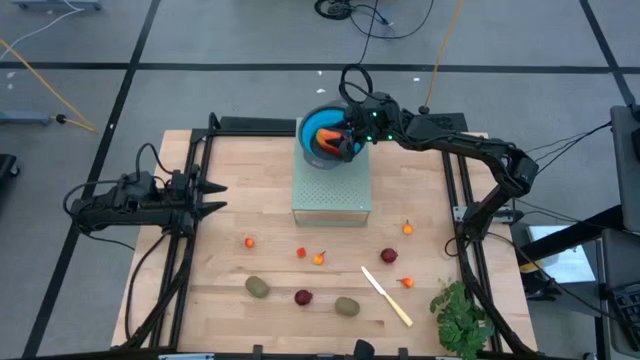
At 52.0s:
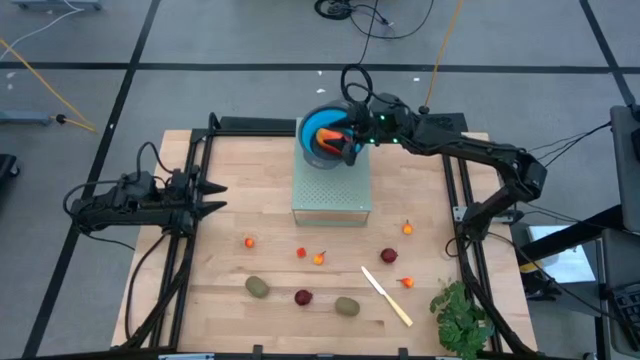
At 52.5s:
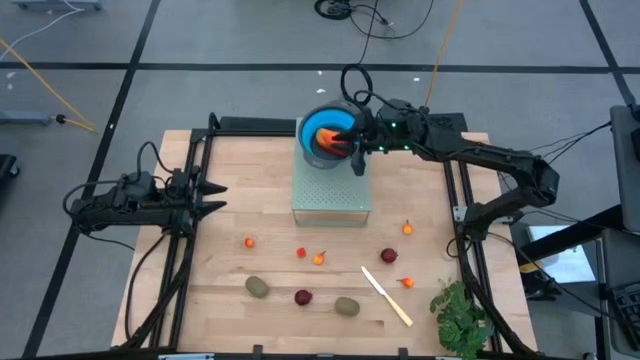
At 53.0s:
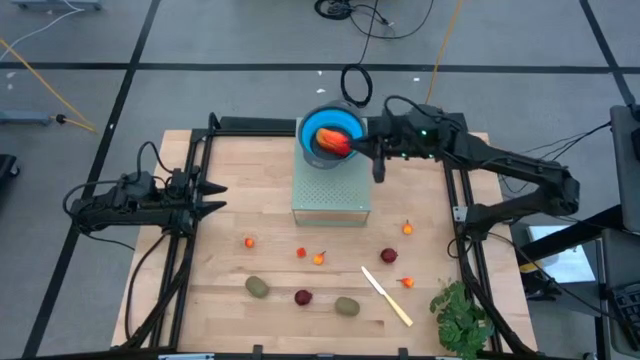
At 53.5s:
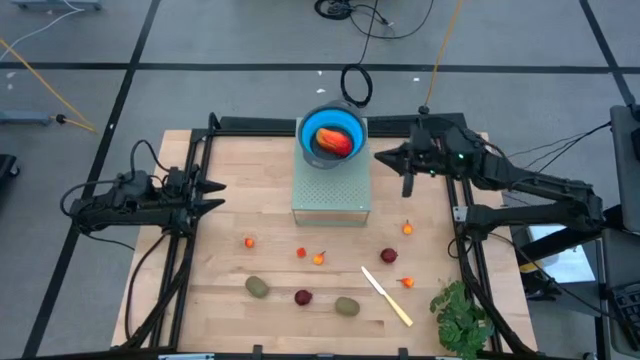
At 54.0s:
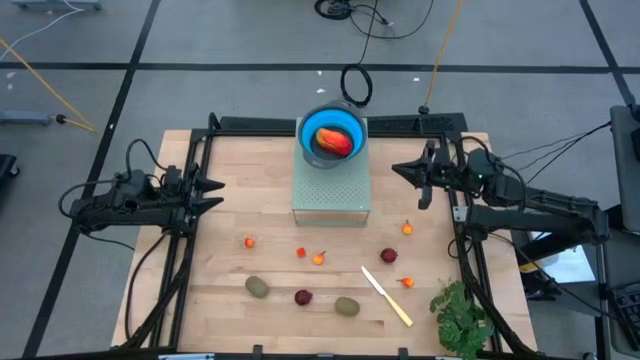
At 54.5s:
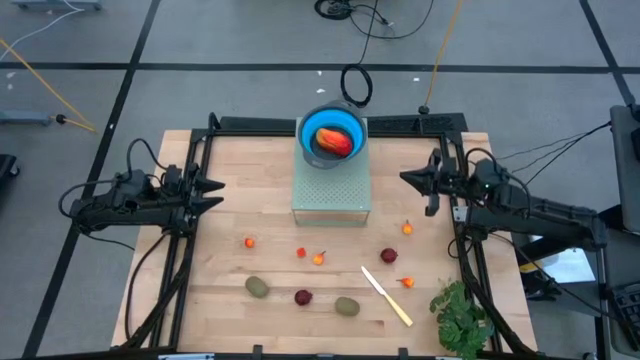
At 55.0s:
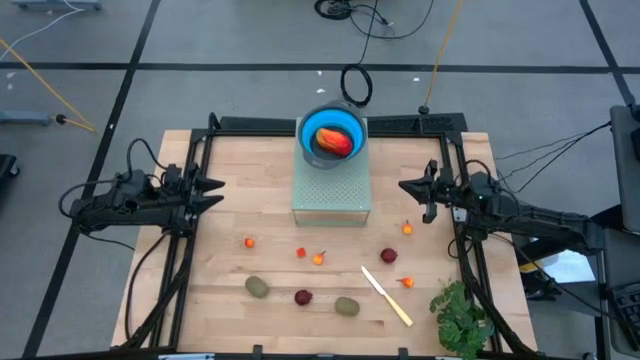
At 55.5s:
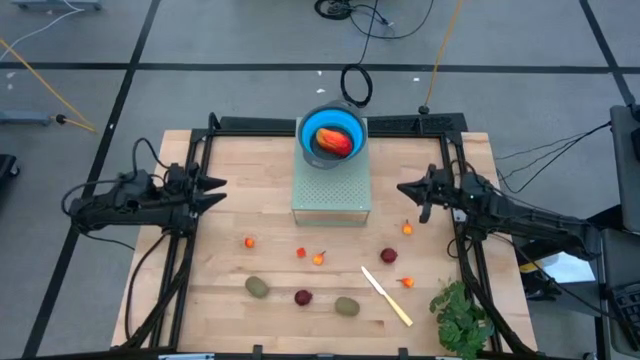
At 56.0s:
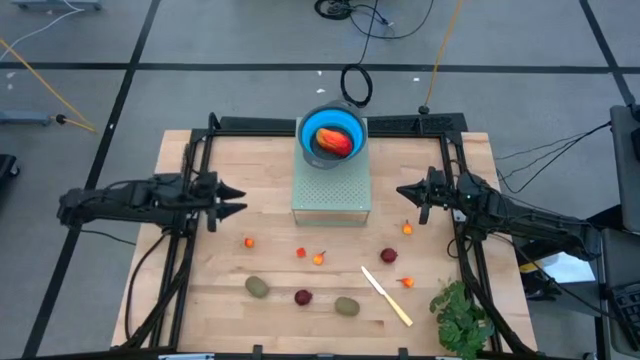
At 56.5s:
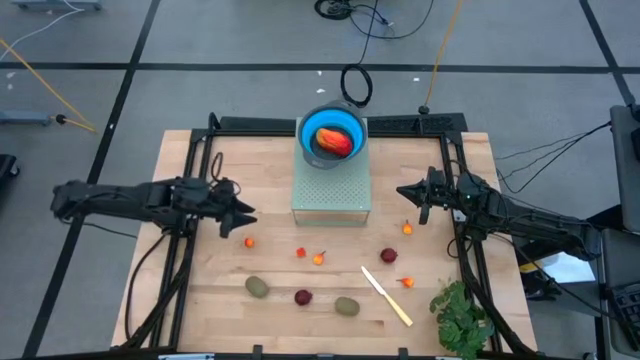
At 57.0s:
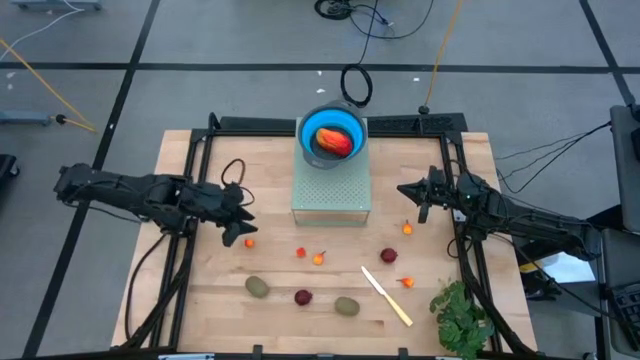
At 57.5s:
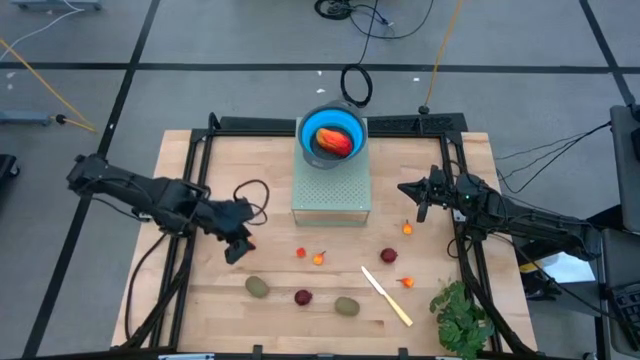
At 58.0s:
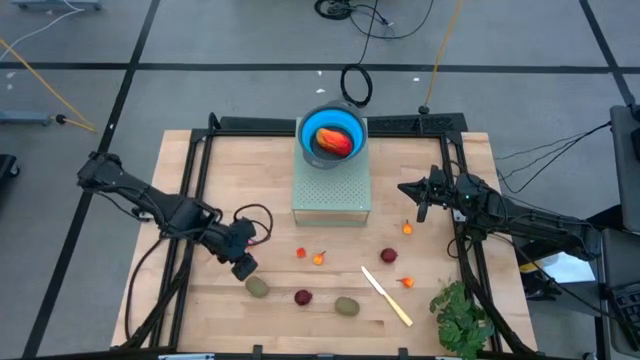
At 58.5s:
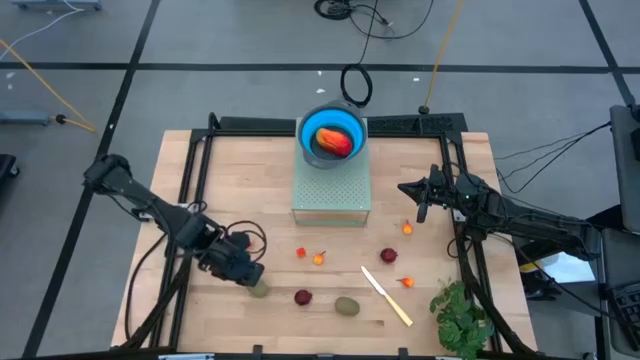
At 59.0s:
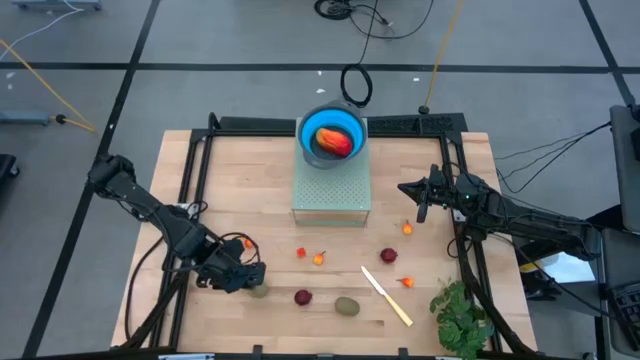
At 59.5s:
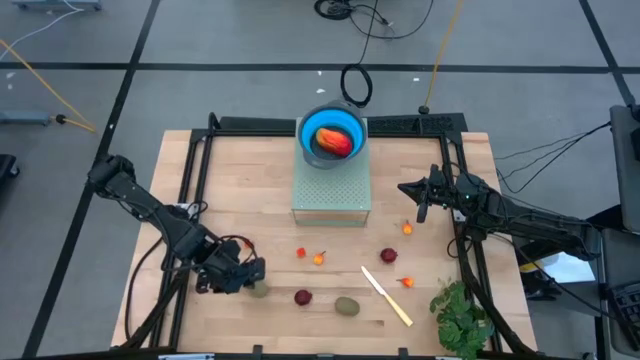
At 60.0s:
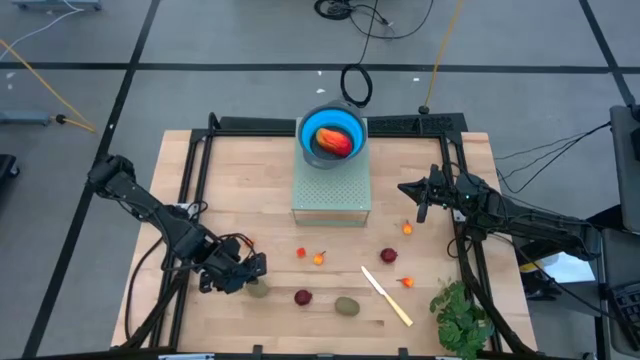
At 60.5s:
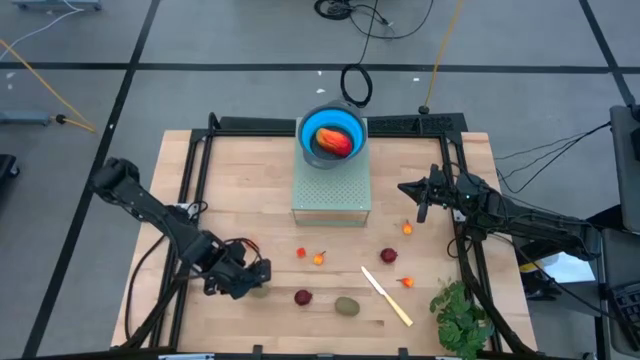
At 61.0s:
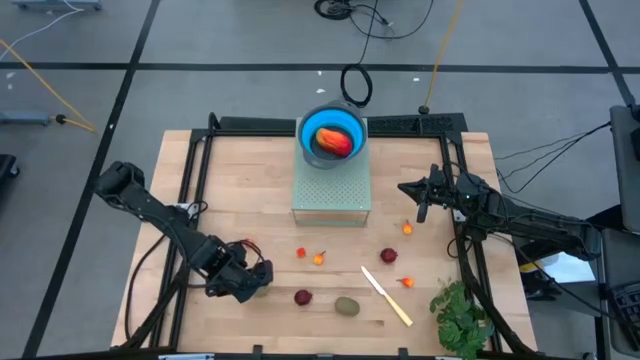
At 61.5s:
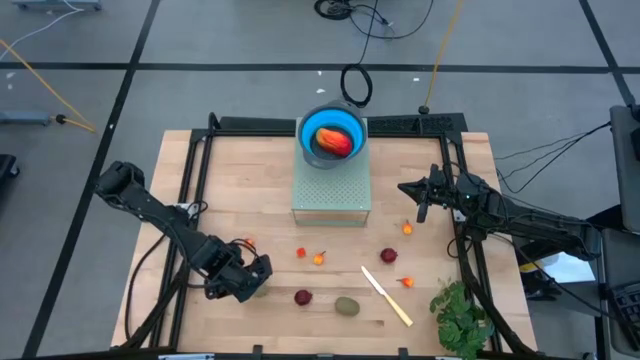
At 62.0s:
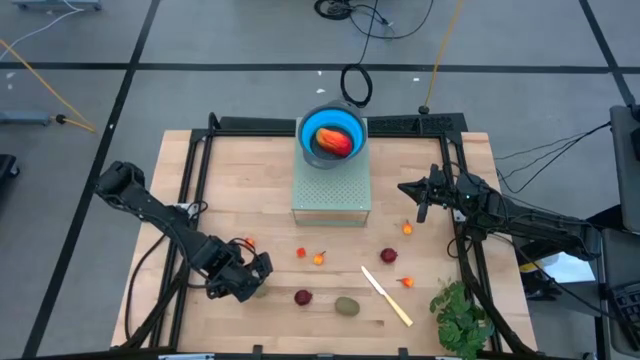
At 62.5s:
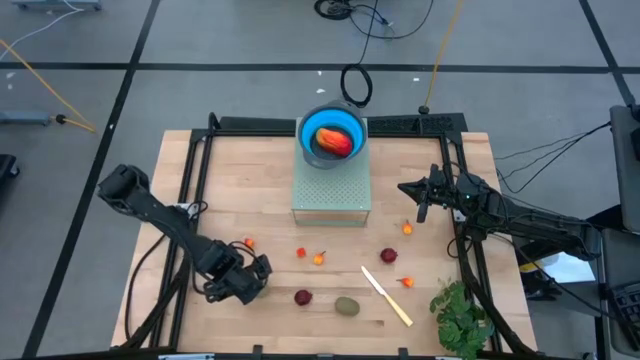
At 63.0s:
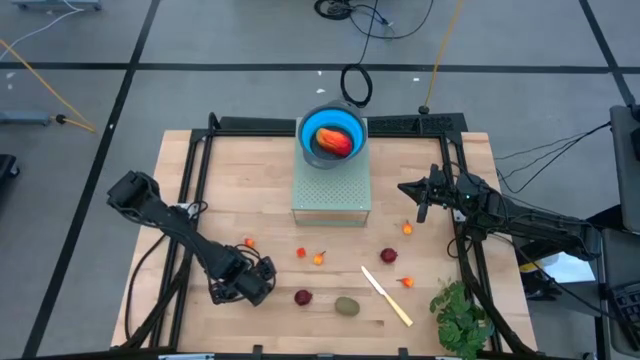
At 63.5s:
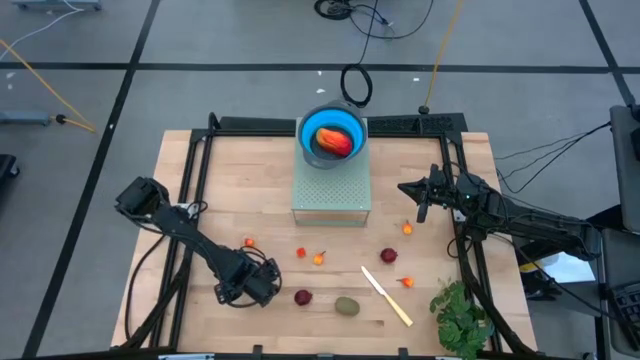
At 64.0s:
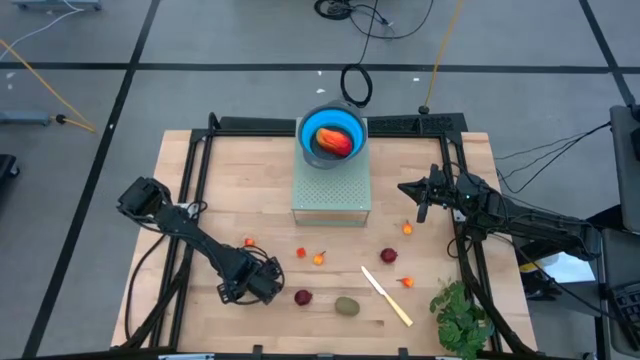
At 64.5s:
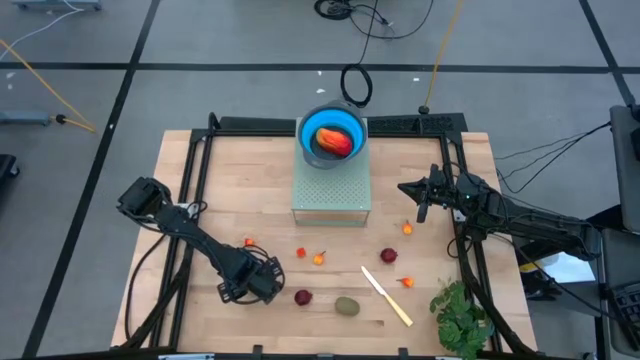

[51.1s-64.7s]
Task: Pick & Place Fruit
Put the kiwi into the blue strainer bowl on the shelf

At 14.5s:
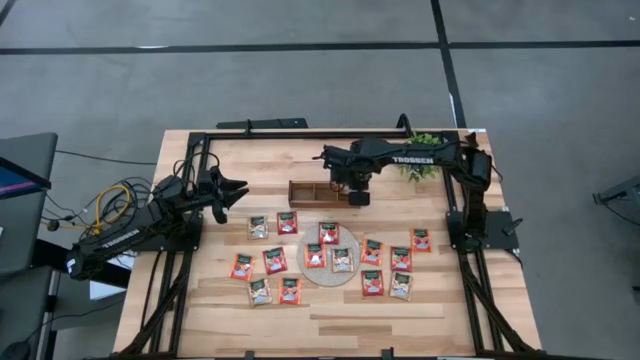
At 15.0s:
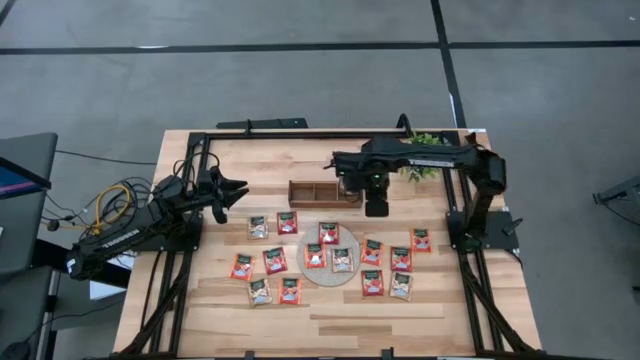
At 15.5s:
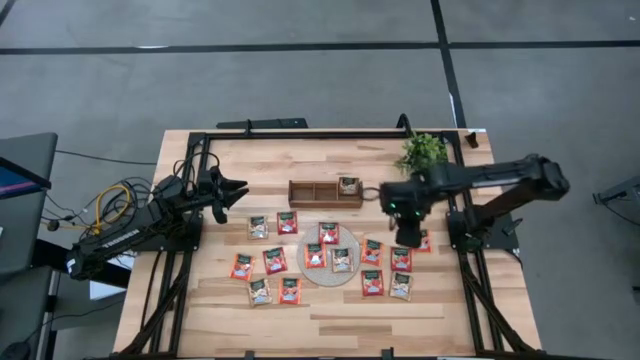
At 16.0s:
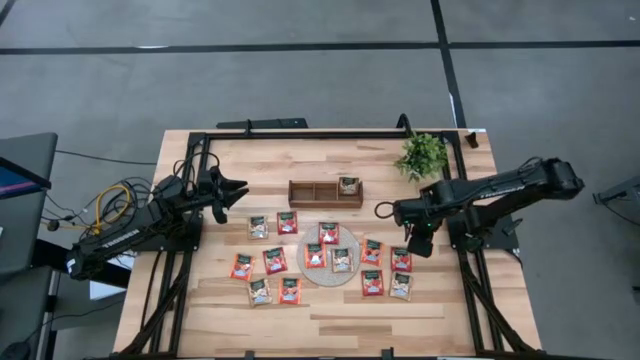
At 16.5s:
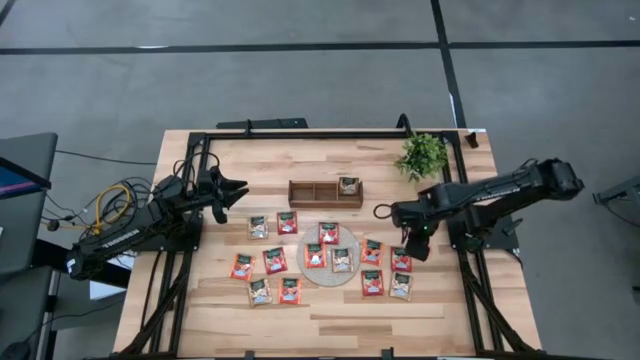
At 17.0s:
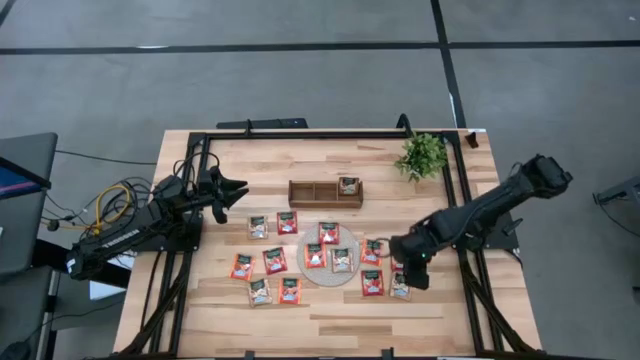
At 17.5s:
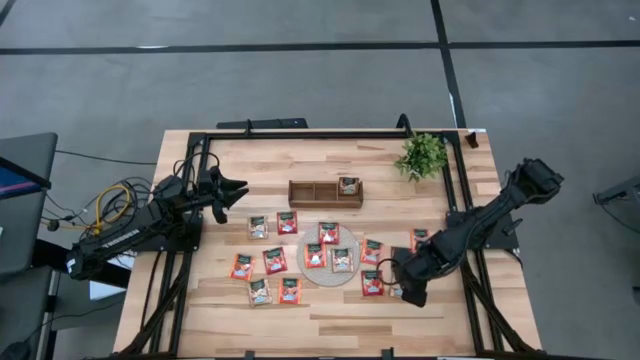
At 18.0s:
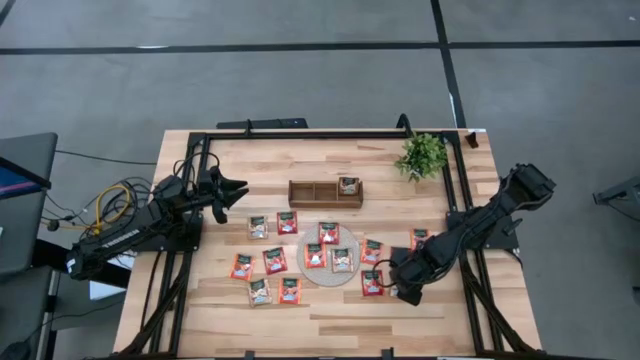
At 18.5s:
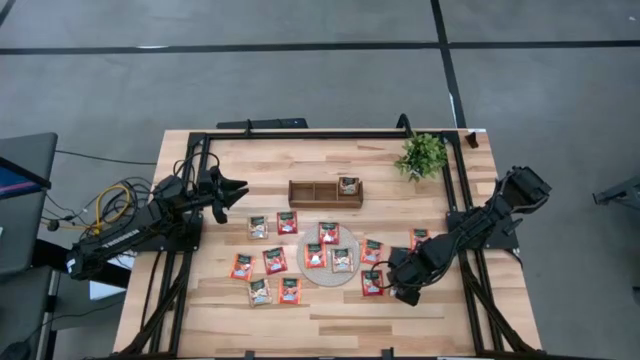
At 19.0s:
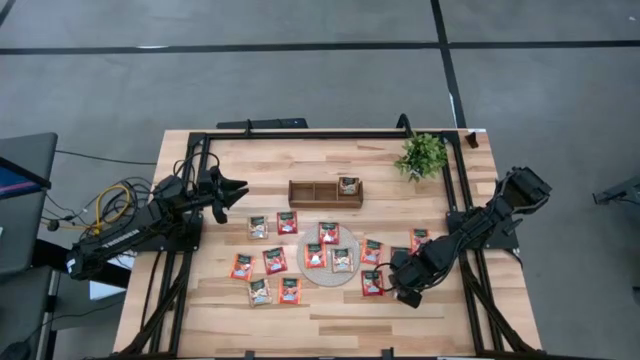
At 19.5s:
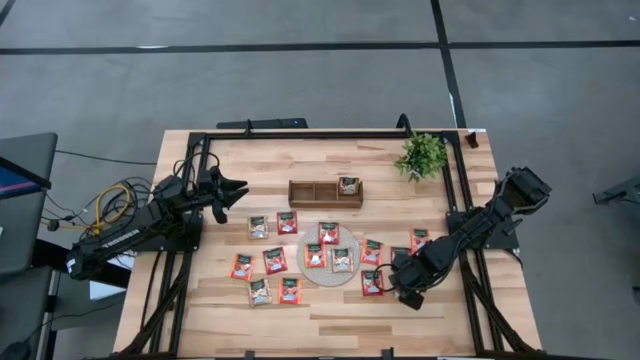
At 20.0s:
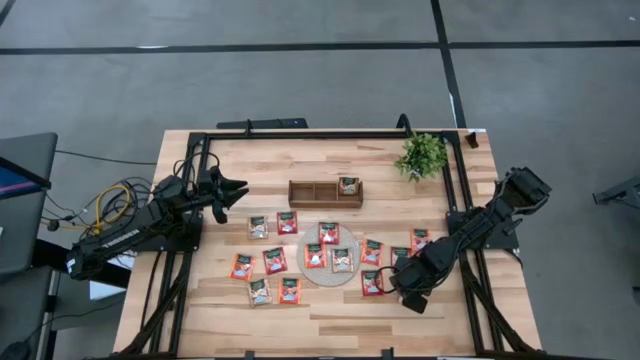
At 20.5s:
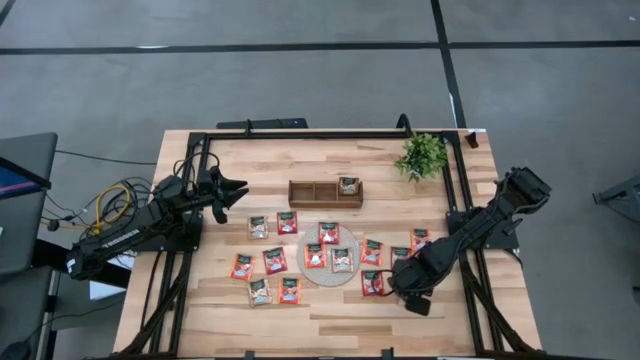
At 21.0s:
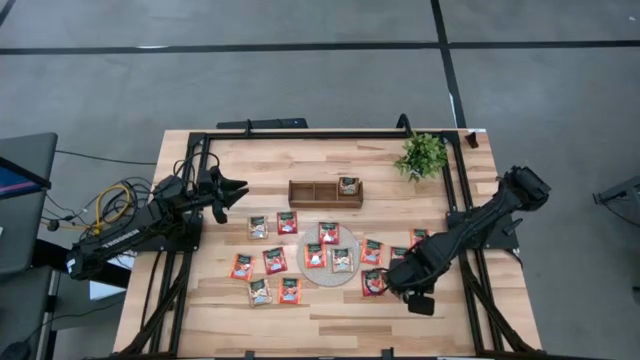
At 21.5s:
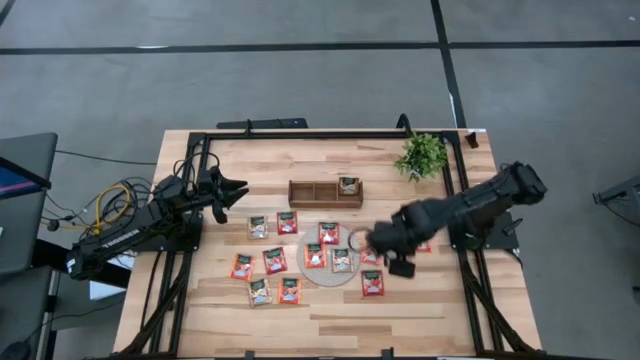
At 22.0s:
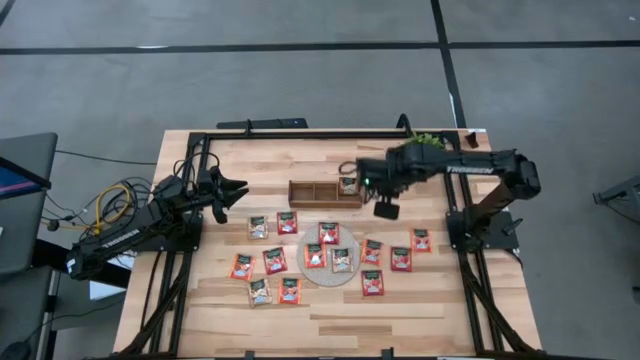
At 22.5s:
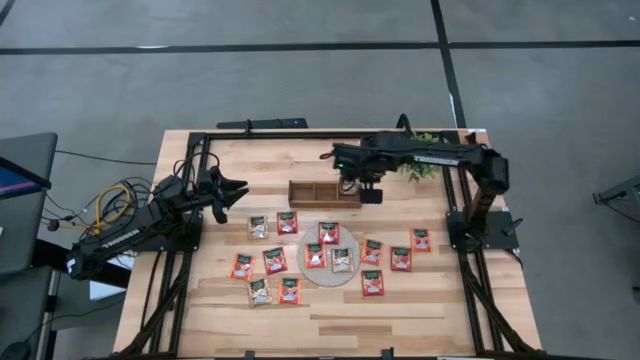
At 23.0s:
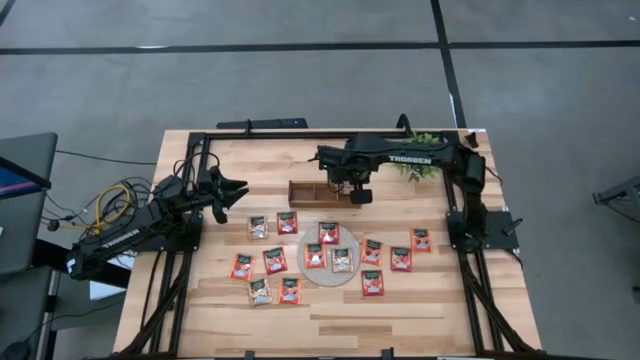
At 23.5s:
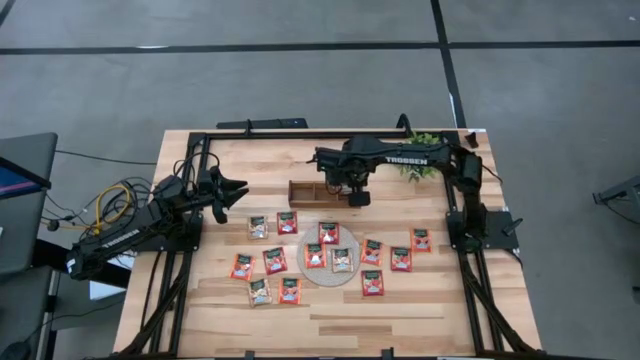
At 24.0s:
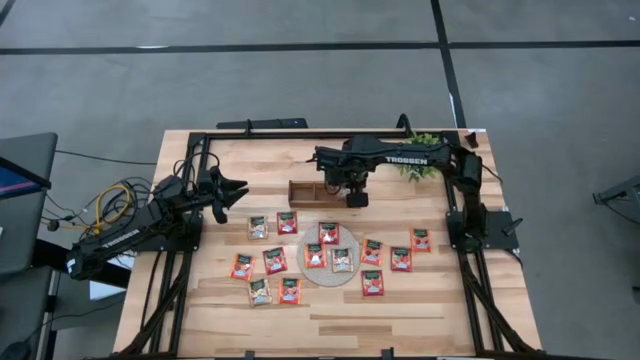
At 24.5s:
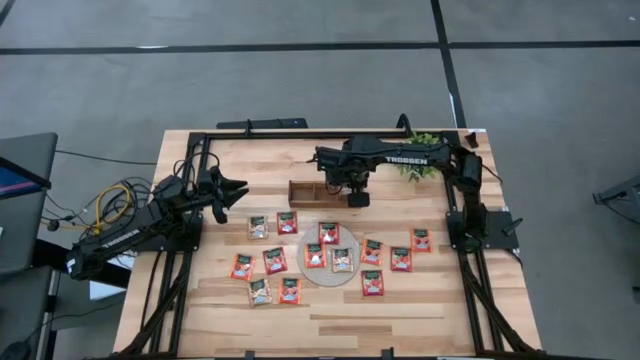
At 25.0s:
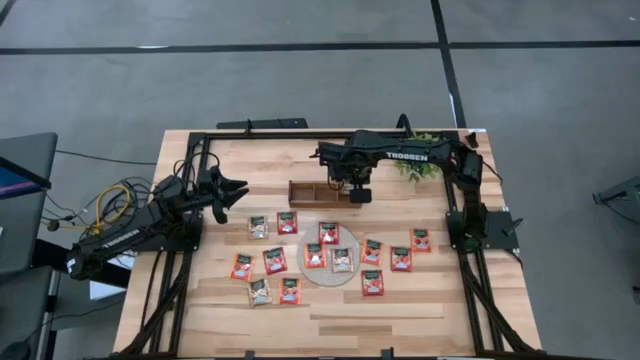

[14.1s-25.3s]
Task: Pick & Place Tea
Put the brown tea bag into the right section of the wooden organizer
